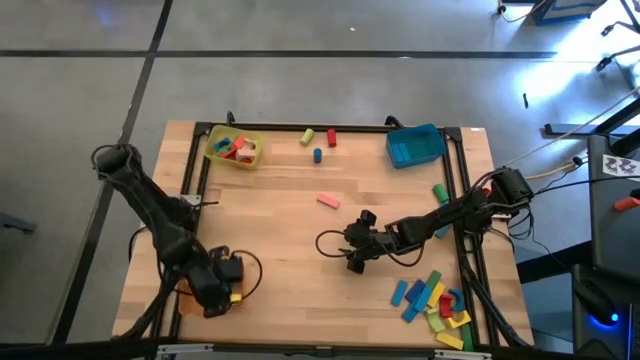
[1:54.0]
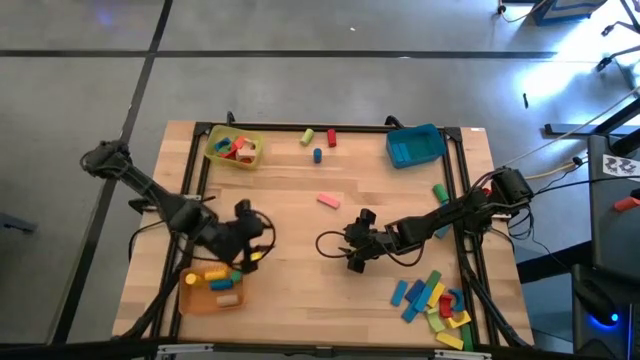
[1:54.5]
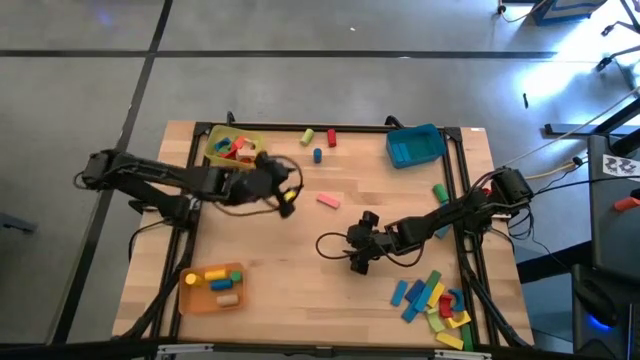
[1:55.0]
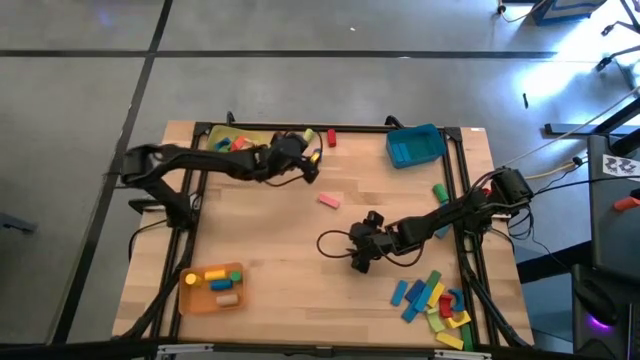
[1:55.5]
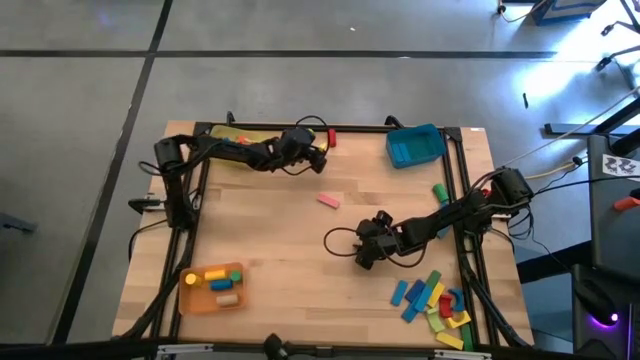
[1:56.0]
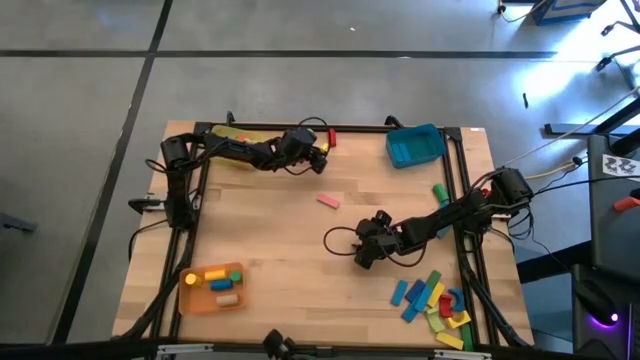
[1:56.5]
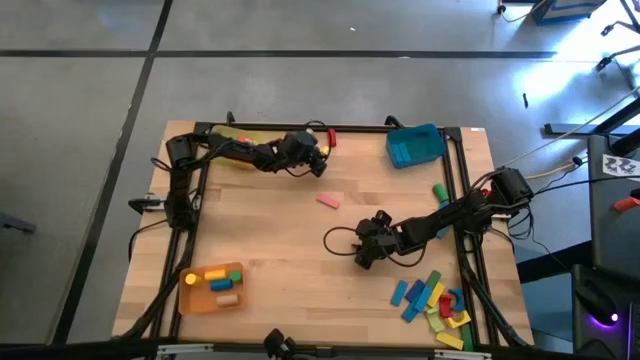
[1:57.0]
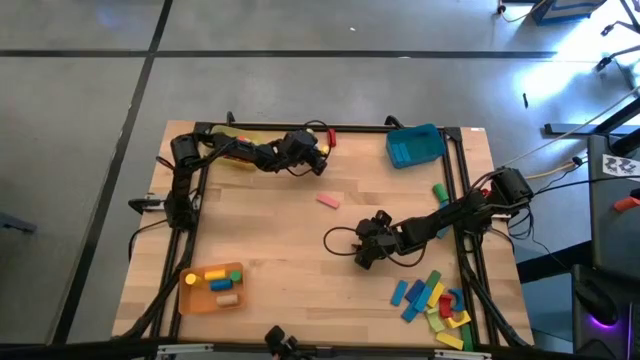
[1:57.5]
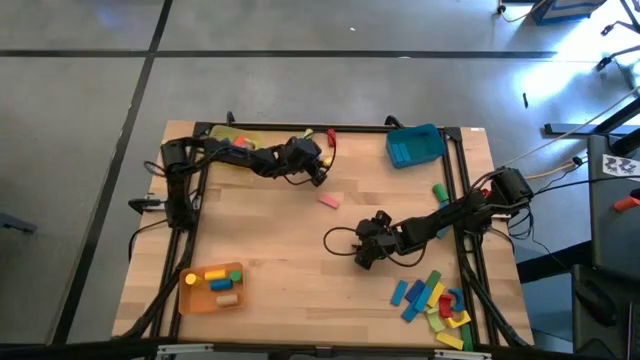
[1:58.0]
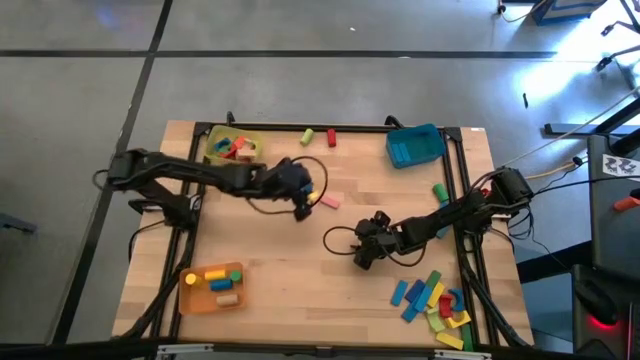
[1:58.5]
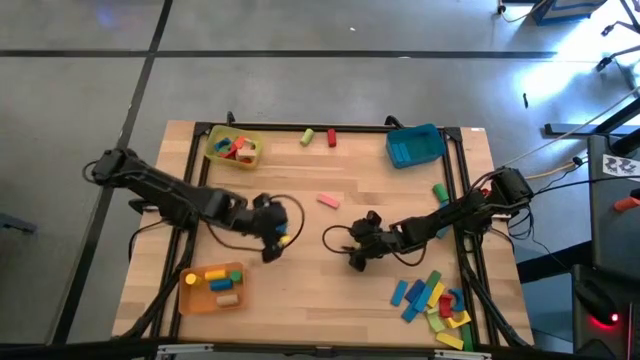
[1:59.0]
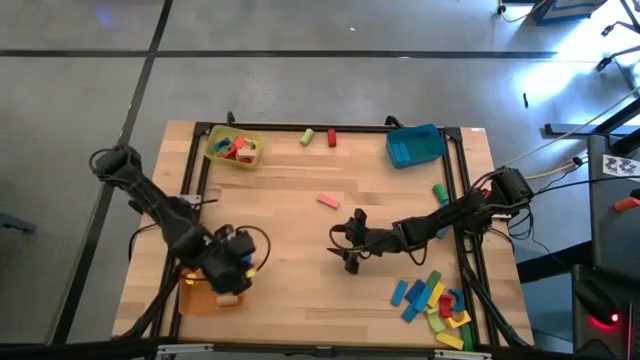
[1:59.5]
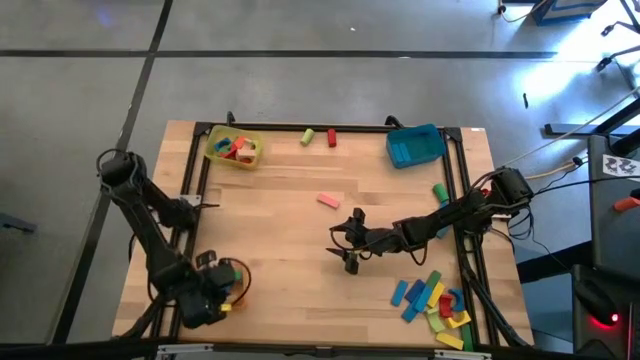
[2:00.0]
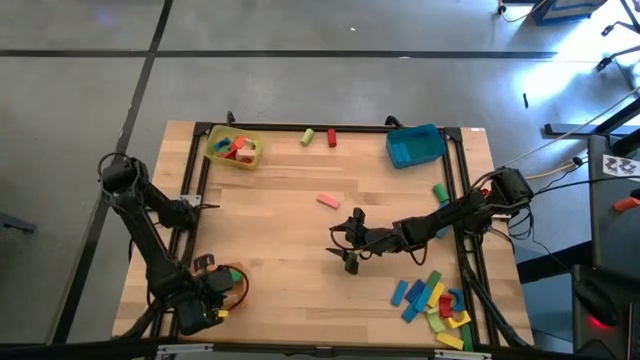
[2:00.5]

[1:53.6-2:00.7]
Task: Sort blocks by size
Put the blue cylindrical block into the light orange bin

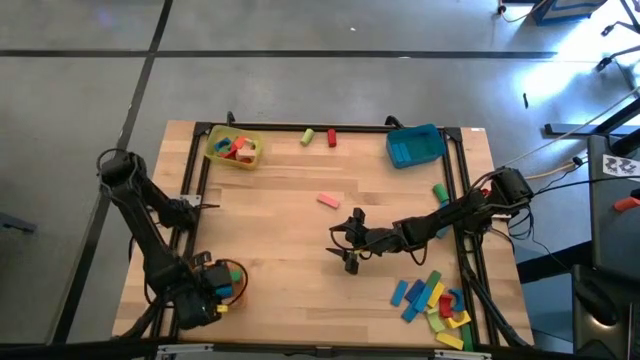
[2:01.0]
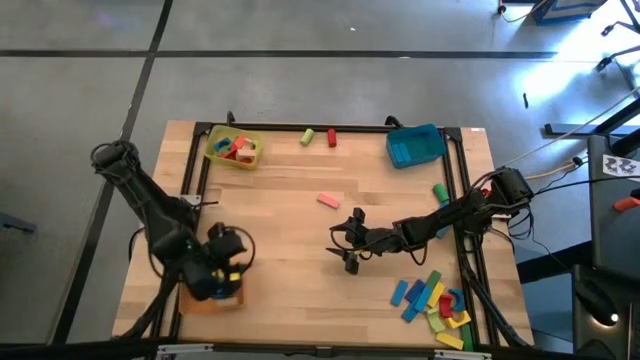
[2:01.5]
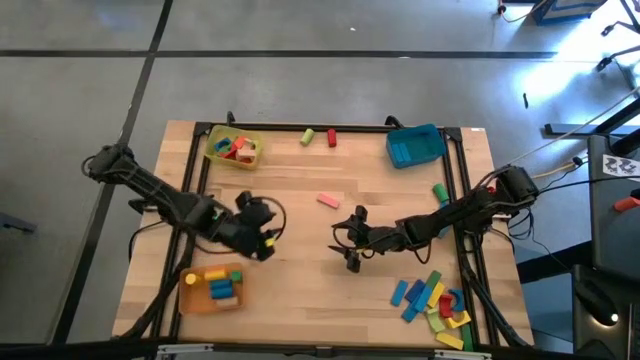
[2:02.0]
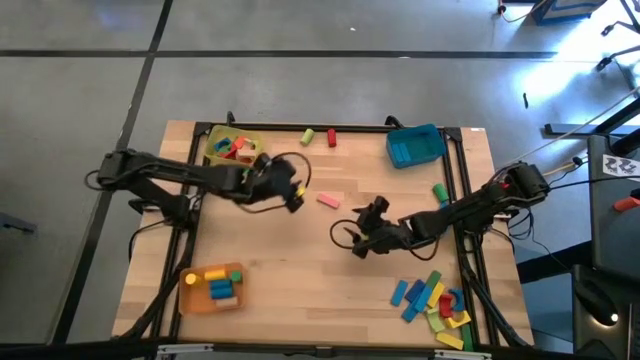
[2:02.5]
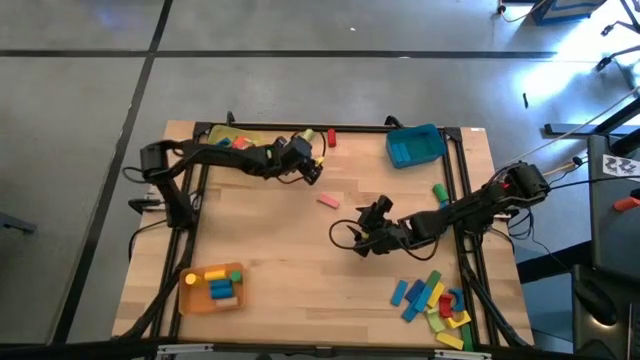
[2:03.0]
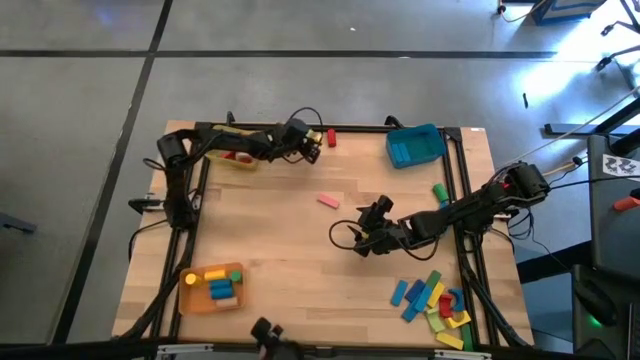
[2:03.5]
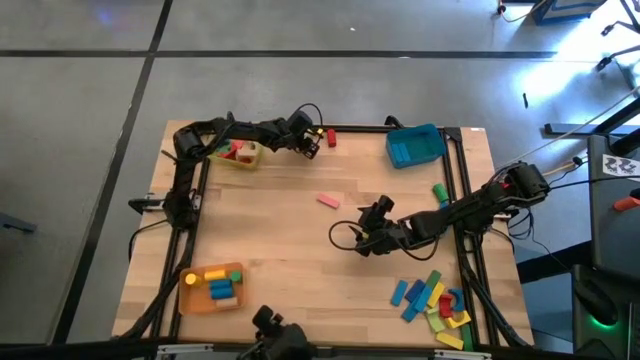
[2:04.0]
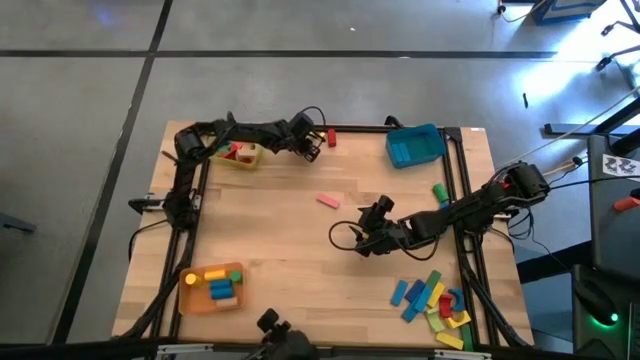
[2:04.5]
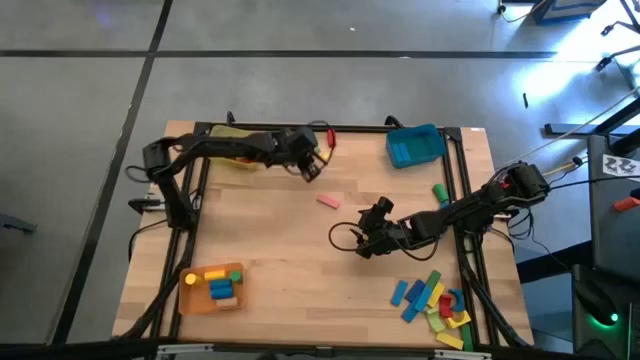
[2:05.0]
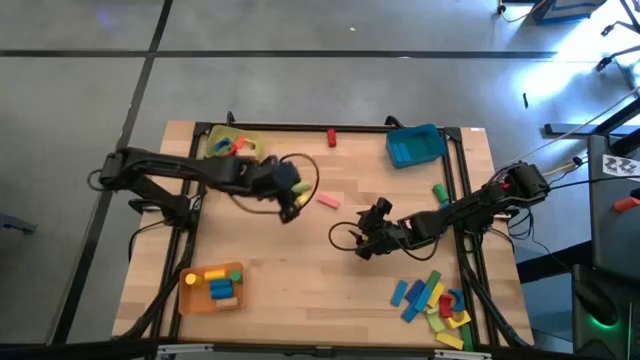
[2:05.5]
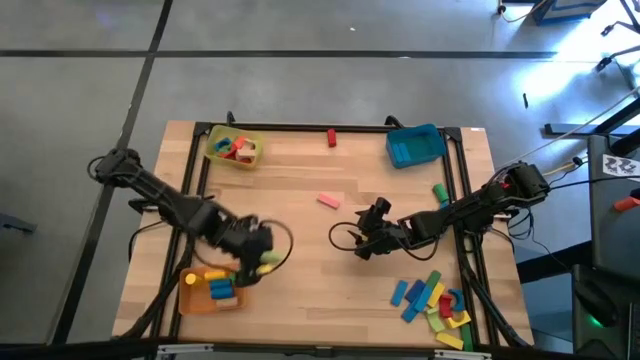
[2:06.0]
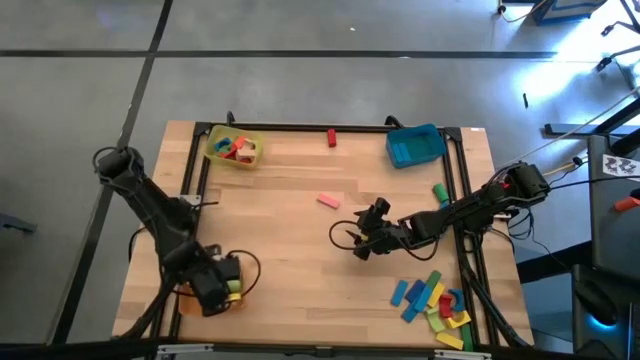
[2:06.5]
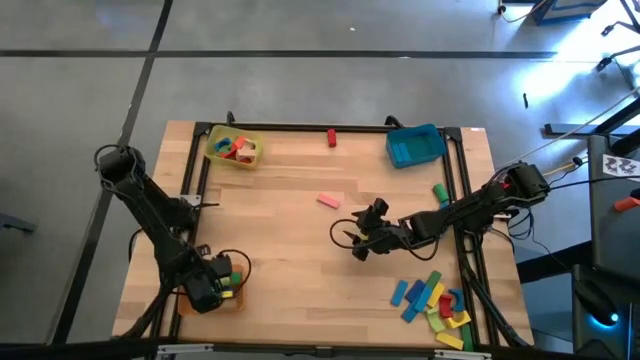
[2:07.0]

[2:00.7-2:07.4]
Put the light green cylindrical block into the light orange bin

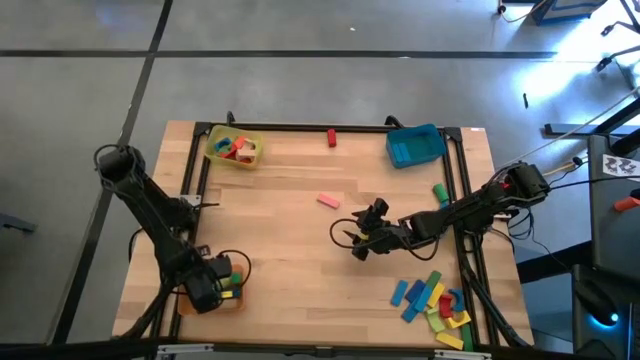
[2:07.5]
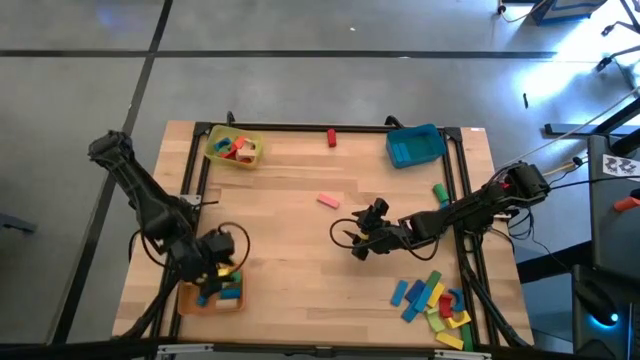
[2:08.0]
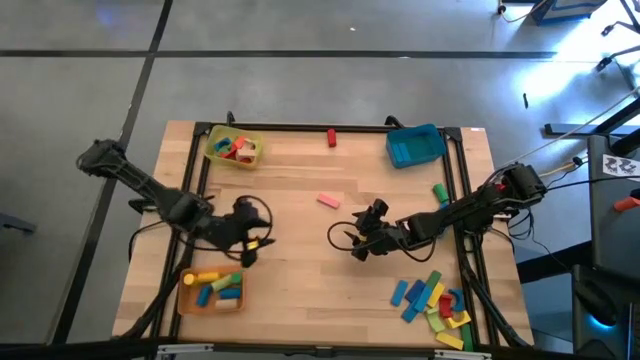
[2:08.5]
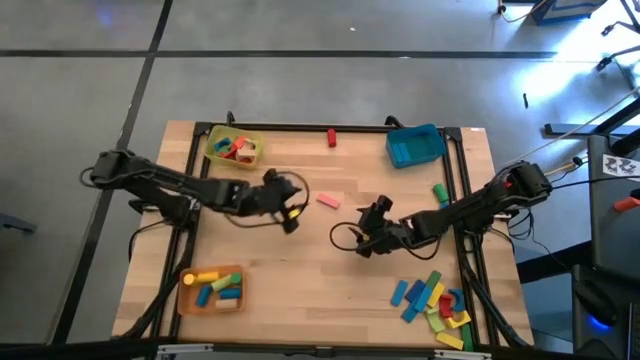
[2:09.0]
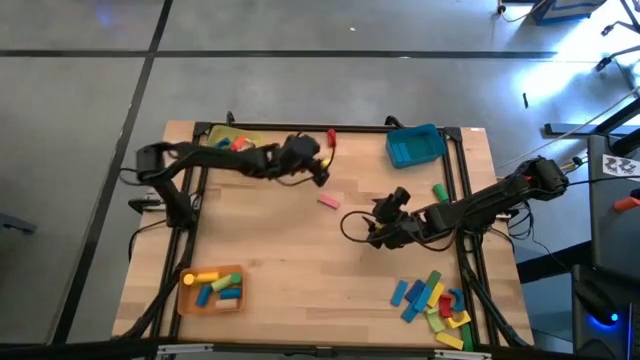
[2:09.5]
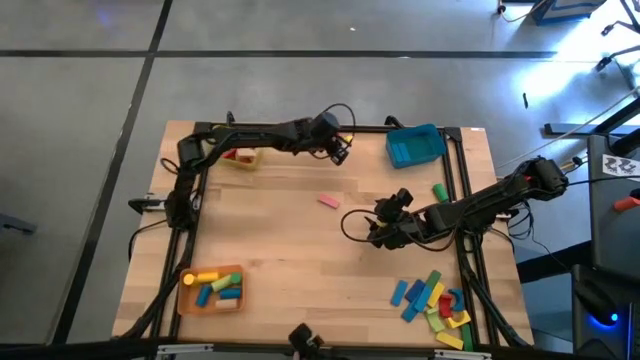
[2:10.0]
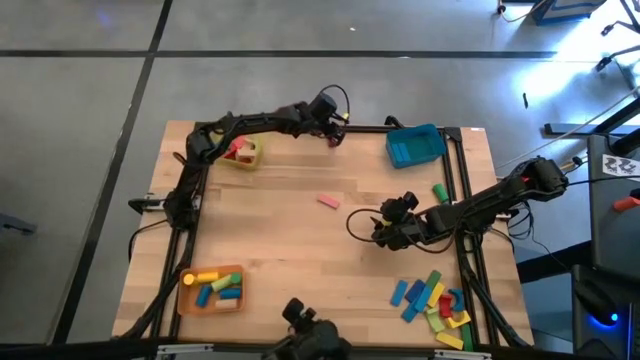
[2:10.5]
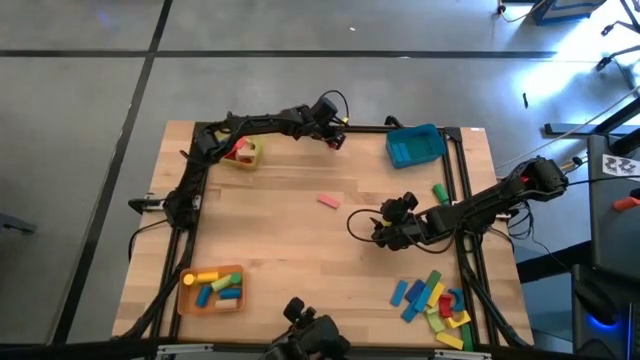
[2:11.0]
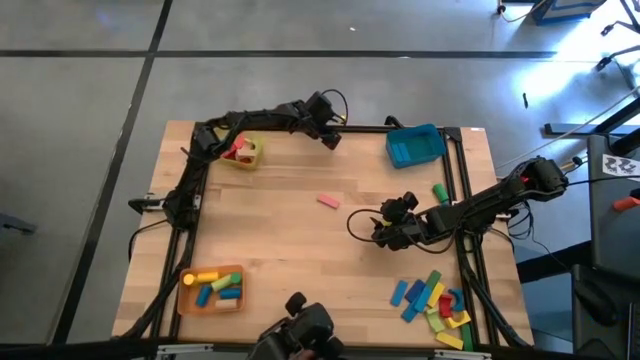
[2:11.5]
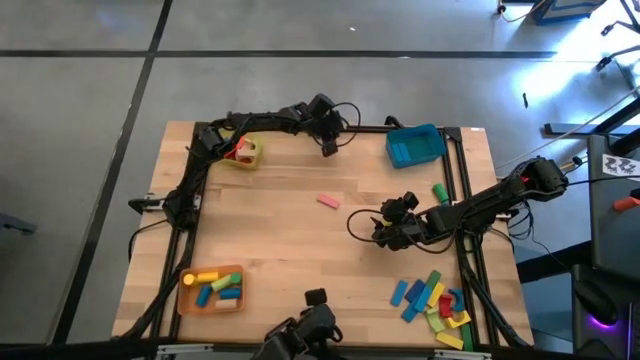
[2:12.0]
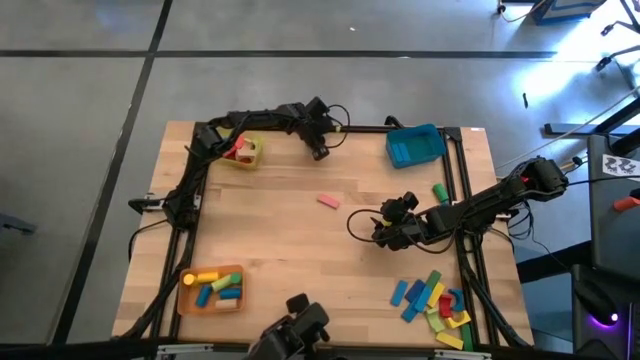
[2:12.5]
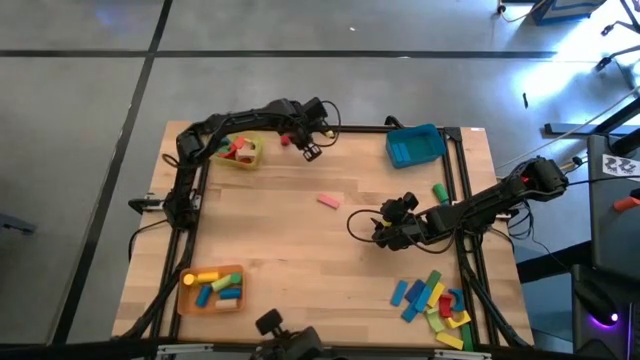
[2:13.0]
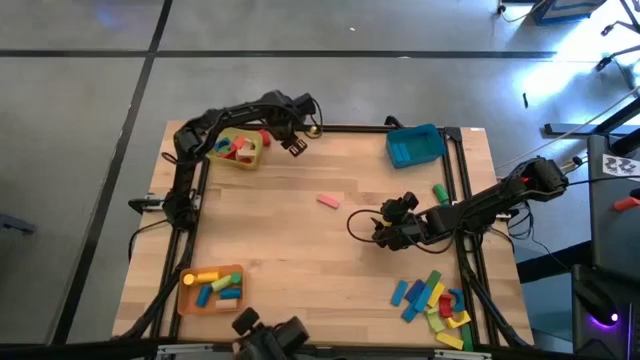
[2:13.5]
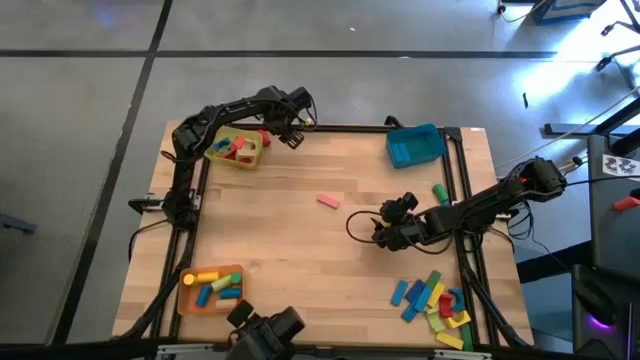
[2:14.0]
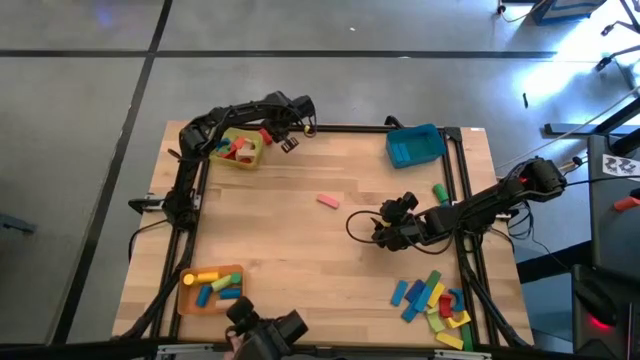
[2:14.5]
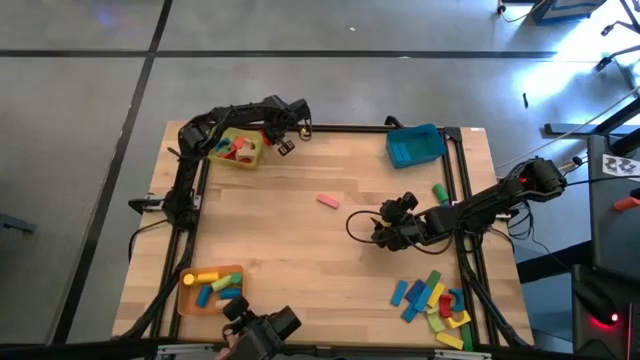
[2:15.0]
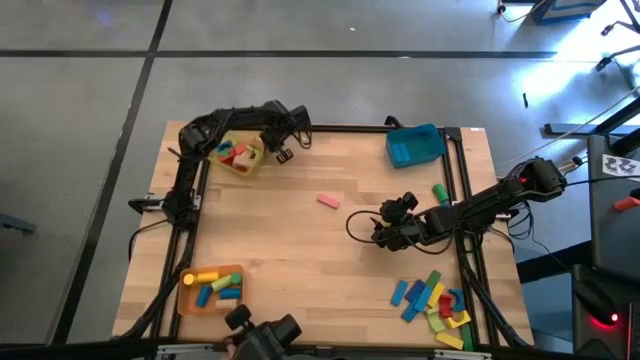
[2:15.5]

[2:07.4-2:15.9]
Put the red cylindrical block into the light orange bin
